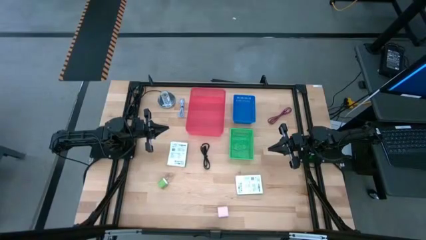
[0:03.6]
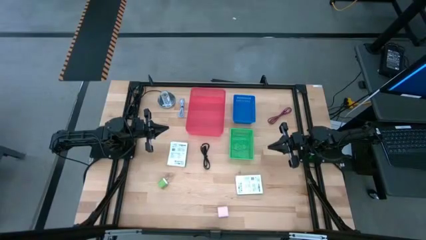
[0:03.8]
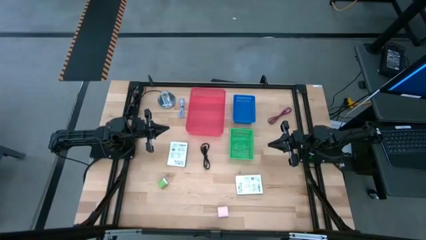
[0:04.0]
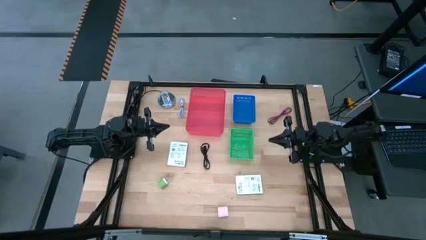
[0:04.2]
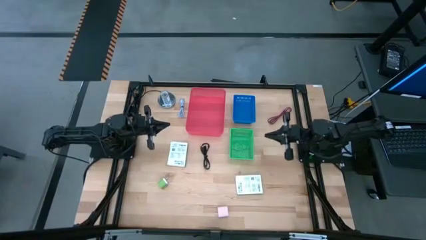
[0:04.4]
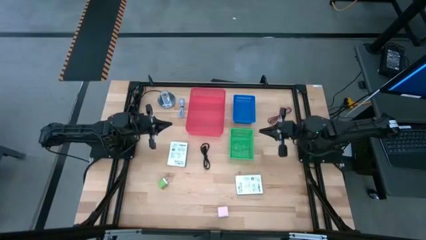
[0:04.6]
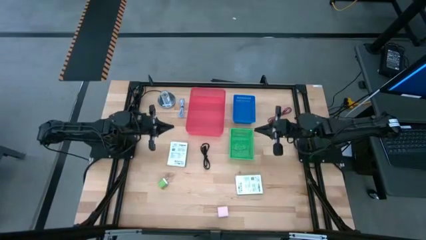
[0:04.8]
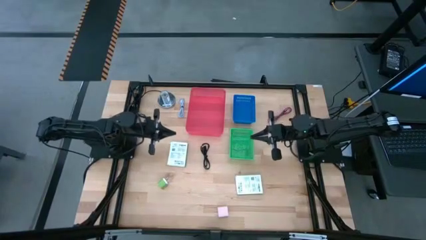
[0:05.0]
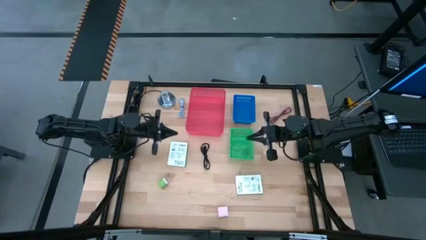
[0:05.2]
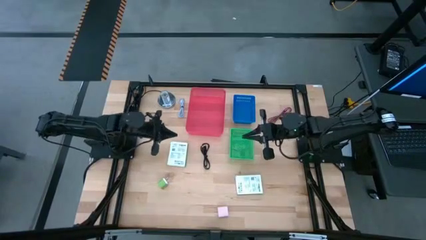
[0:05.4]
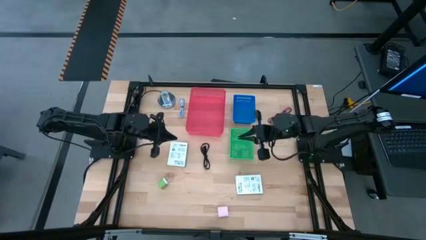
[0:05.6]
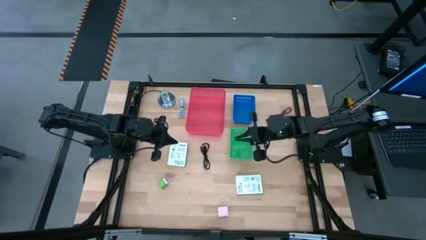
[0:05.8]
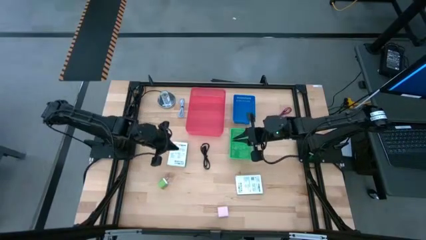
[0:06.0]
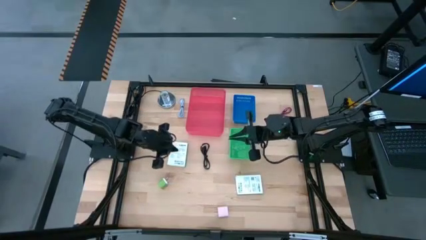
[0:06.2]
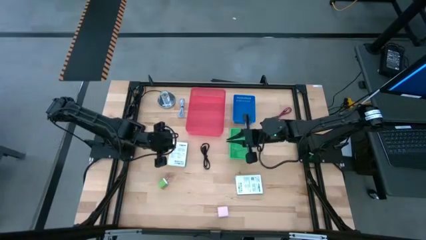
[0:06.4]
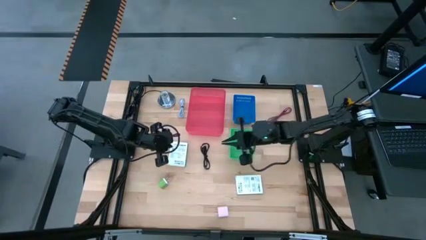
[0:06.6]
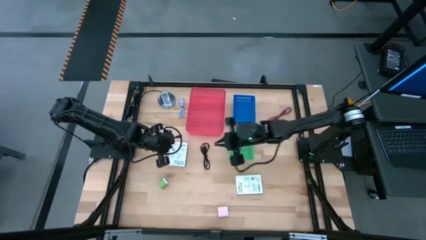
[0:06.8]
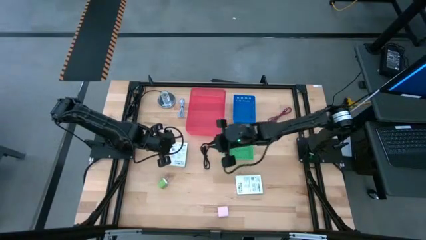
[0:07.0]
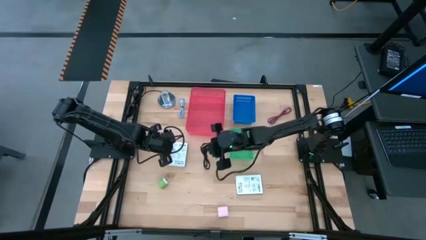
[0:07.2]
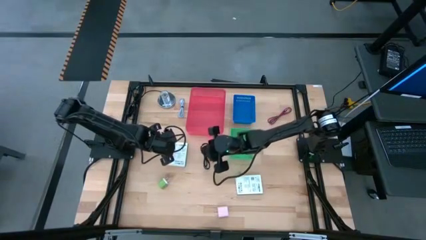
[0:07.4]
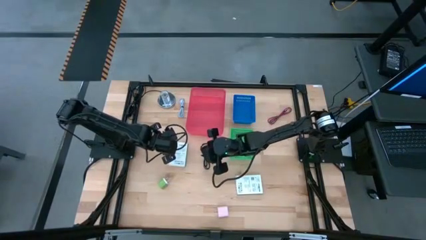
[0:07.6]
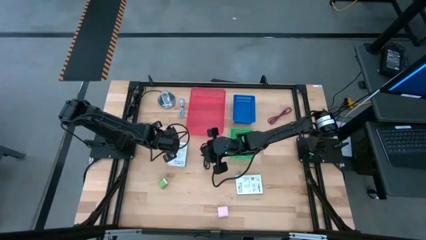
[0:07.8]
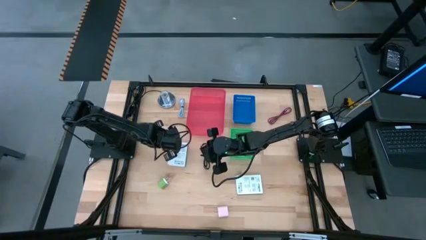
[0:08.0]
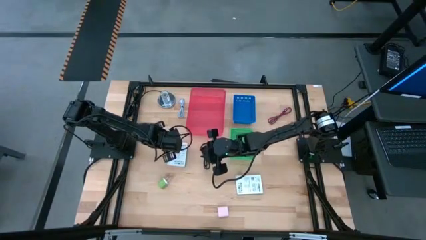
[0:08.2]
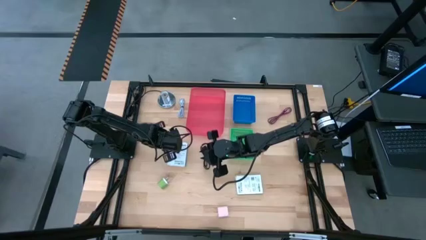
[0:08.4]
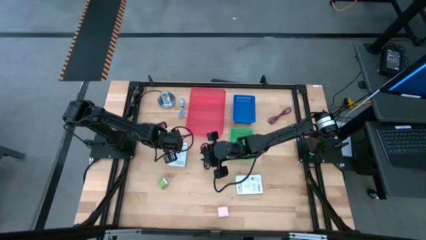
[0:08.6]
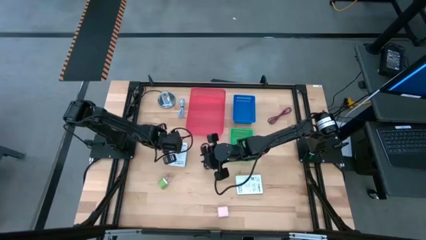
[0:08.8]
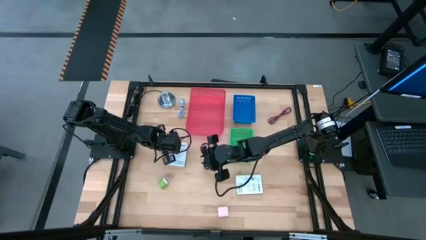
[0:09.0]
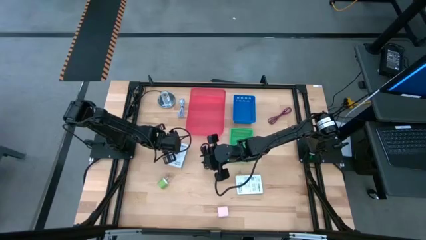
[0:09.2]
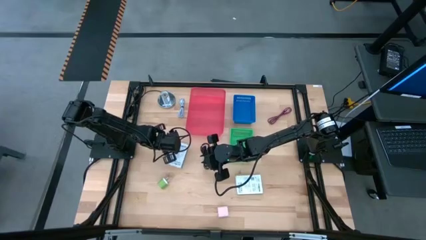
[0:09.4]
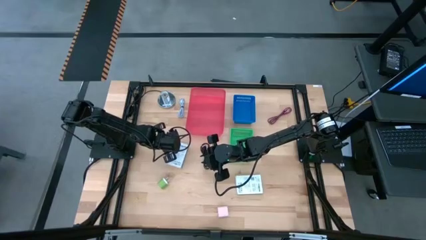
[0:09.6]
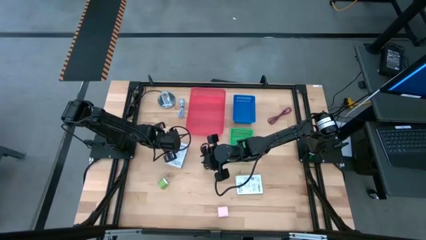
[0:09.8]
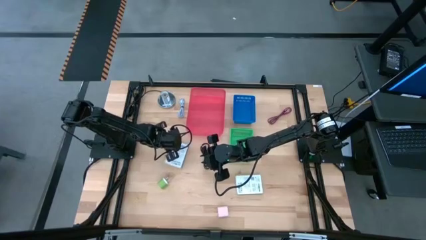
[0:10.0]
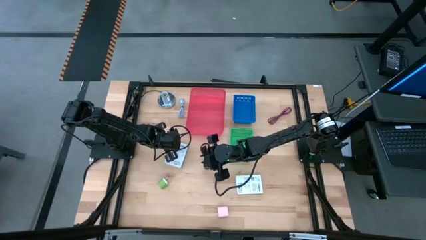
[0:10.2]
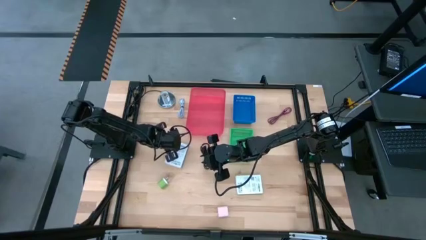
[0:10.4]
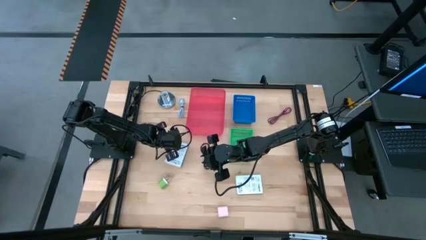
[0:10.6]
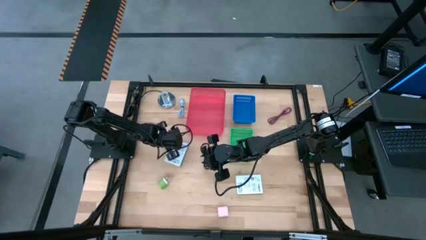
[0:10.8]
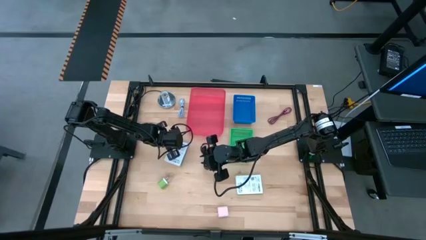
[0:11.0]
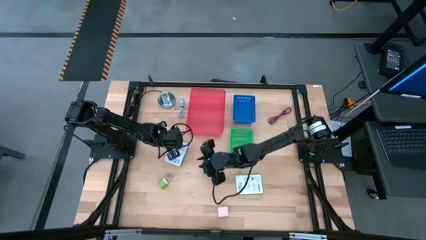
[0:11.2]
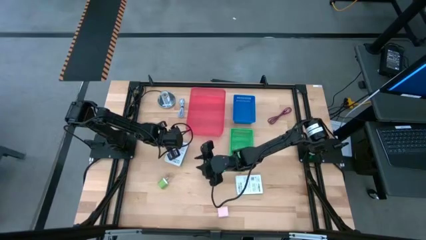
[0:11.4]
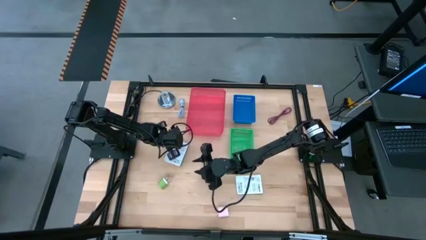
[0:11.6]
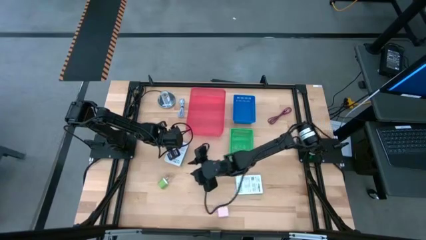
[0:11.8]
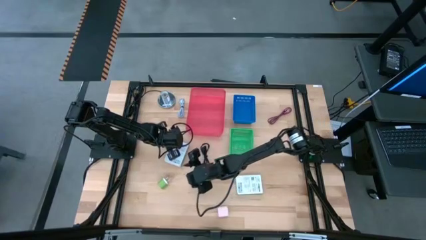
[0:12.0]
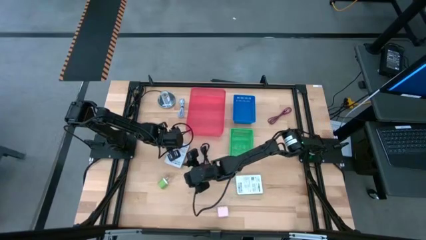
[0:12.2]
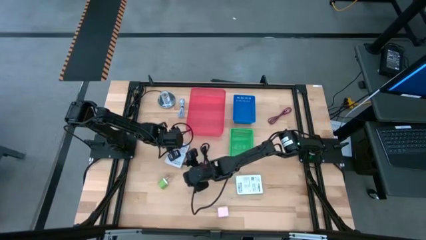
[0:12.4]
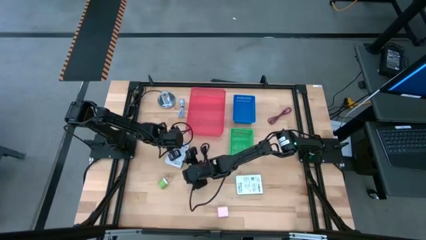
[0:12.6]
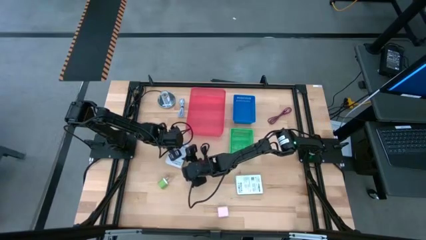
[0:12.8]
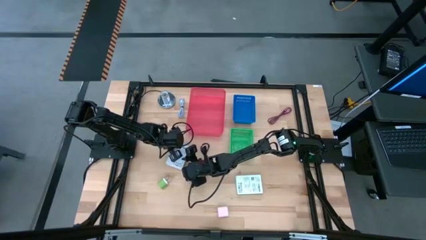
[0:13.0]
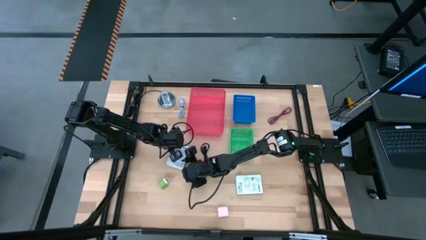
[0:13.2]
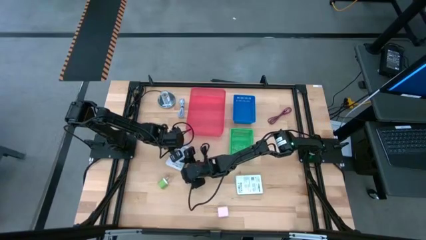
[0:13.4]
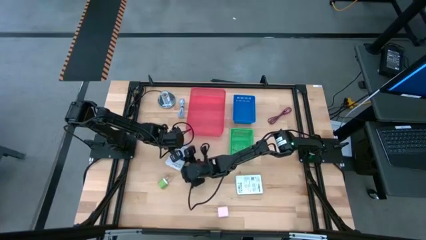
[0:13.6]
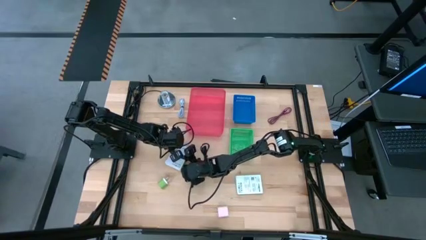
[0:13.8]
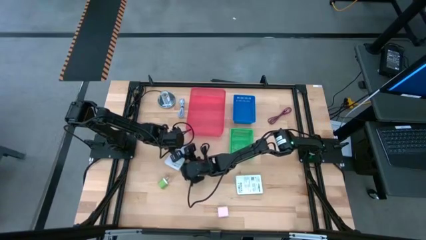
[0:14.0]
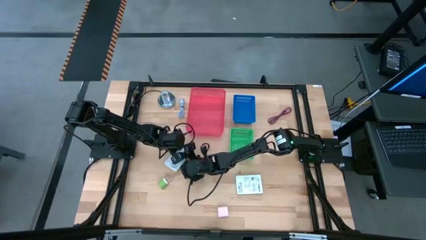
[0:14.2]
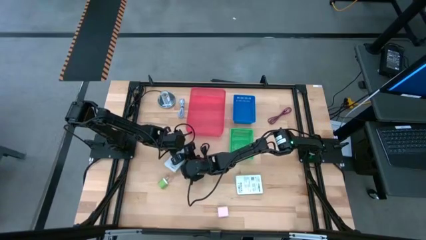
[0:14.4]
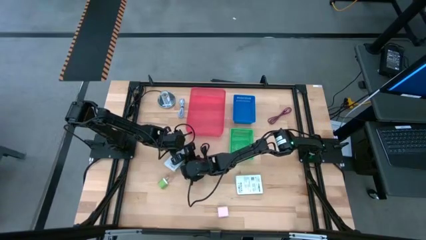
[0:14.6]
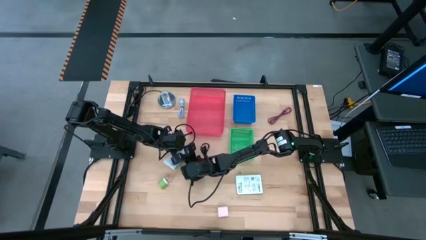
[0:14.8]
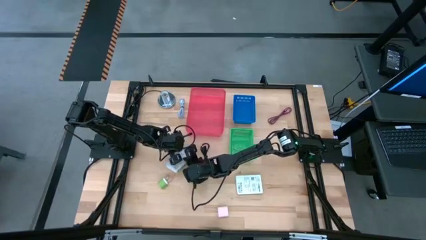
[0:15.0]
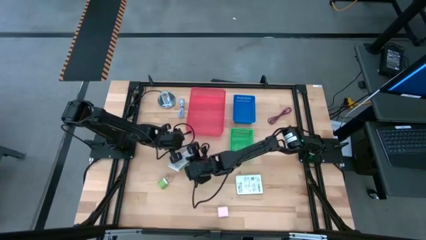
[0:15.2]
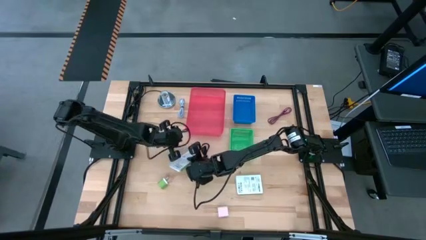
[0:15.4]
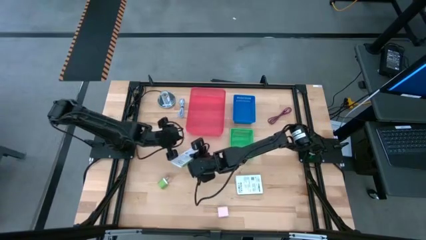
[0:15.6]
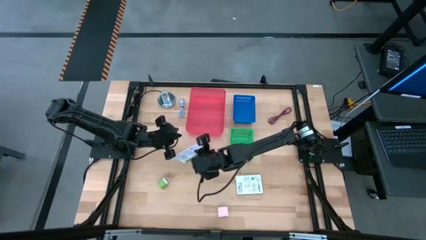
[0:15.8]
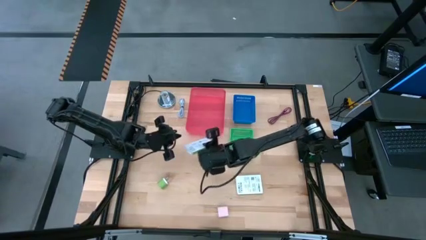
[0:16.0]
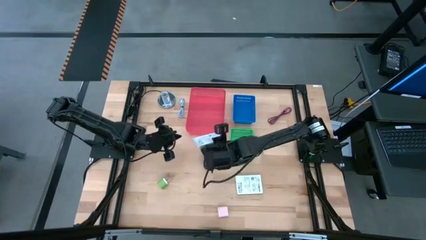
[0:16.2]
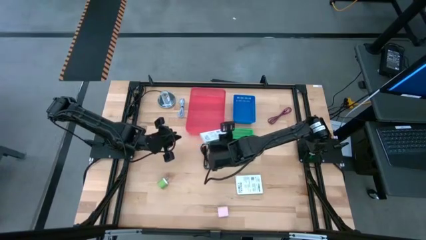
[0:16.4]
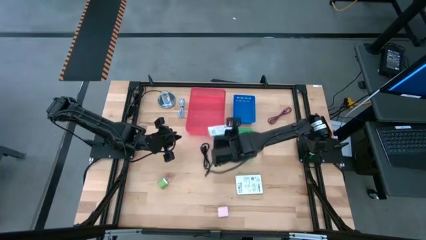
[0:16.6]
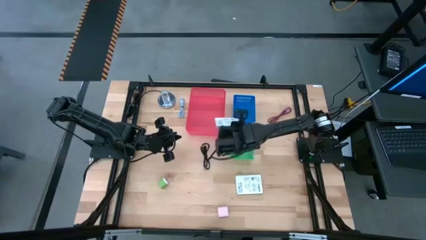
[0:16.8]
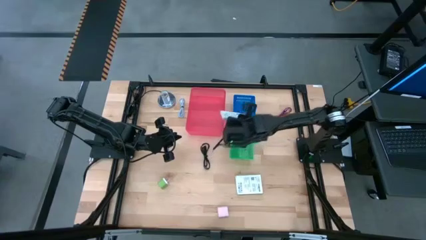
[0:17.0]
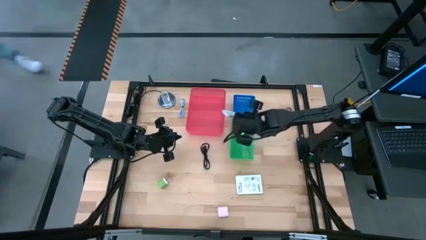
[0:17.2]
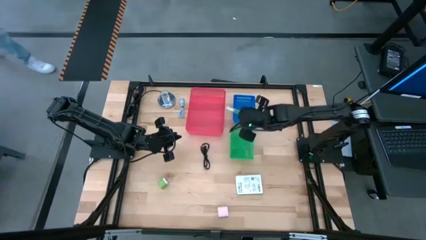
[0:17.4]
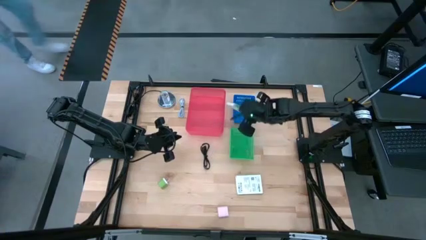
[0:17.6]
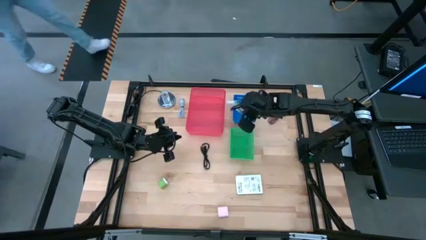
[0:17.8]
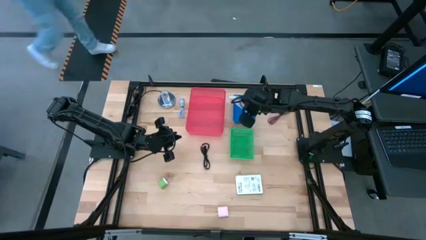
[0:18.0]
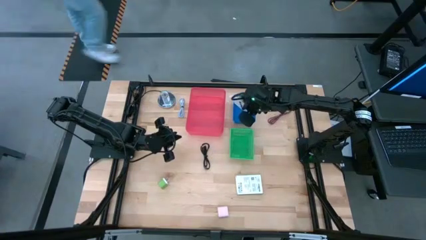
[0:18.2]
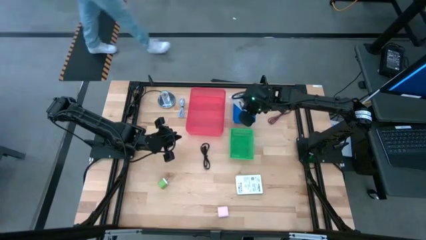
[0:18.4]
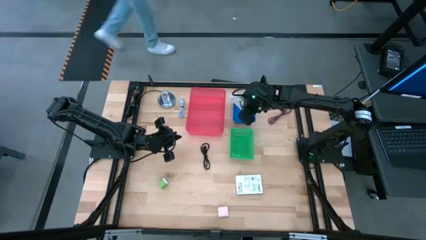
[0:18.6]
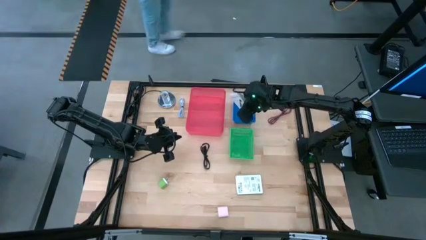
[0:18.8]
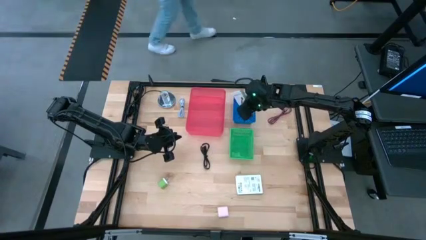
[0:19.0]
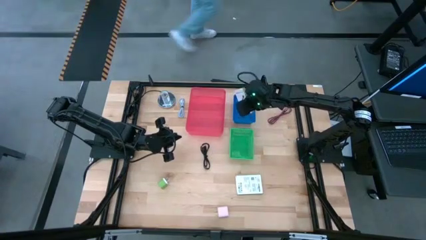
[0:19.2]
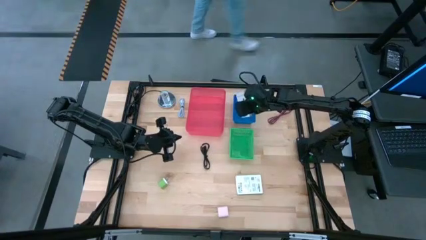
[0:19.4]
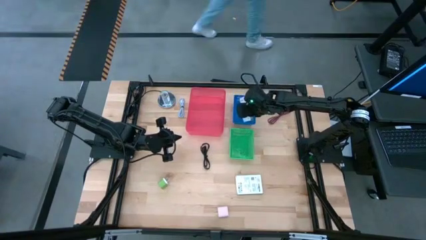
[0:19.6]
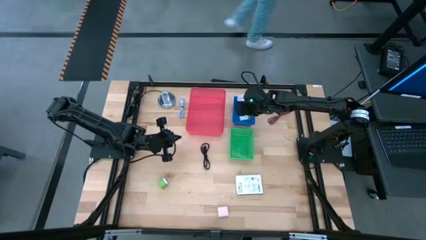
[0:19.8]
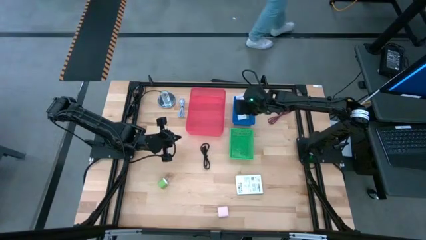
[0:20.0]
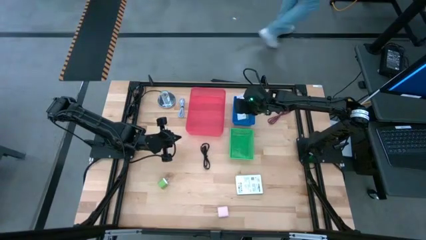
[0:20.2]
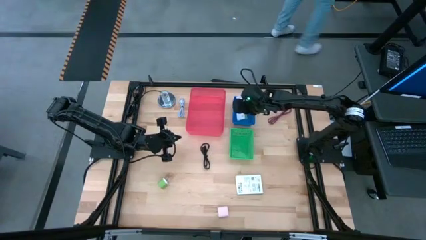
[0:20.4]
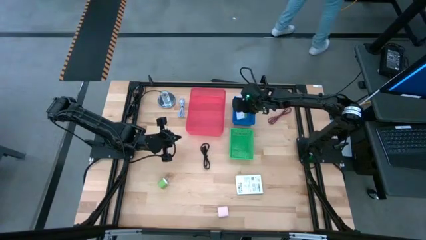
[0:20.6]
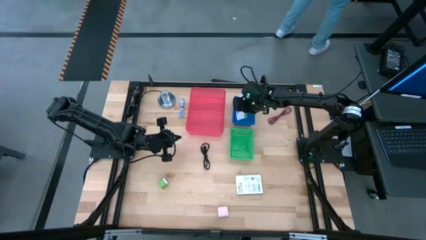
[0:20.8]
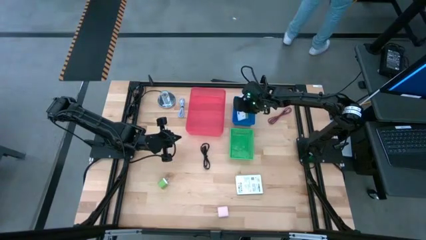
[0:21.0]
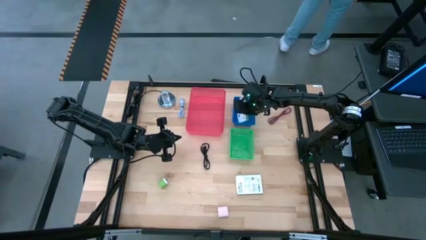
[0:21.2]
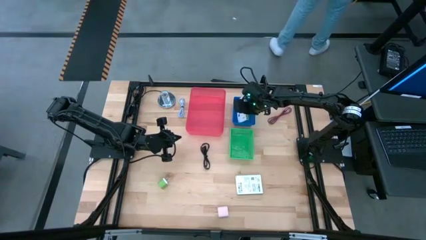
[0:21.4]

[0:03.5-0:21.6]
Task: Pick and place items into bin
Put the left white card reader box into the blue bin
